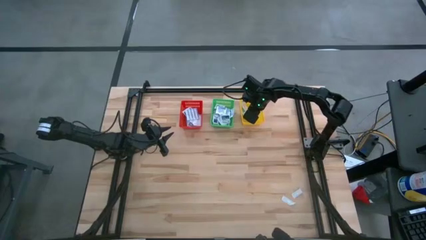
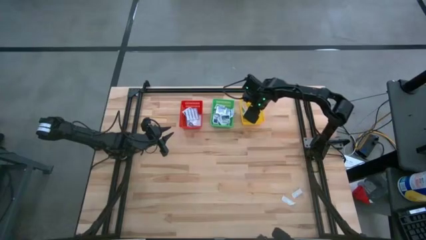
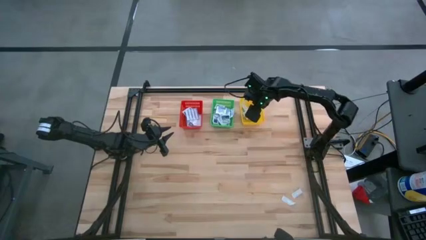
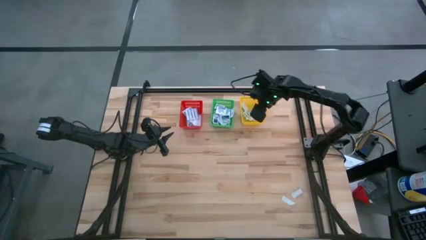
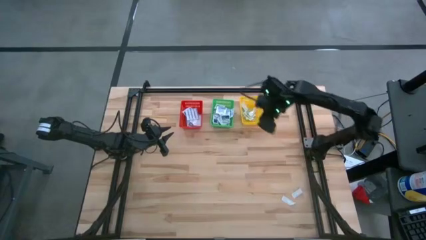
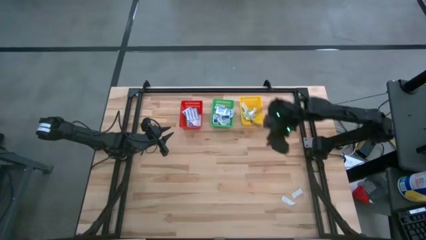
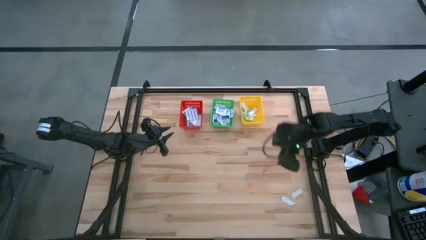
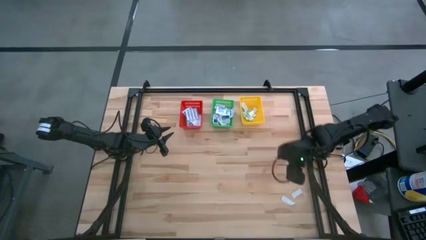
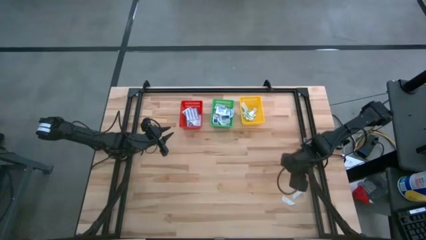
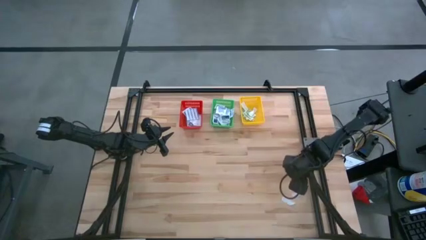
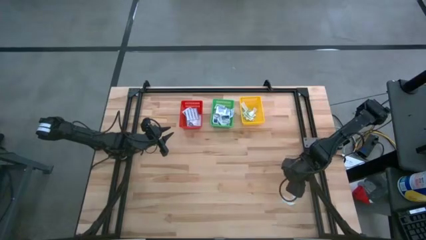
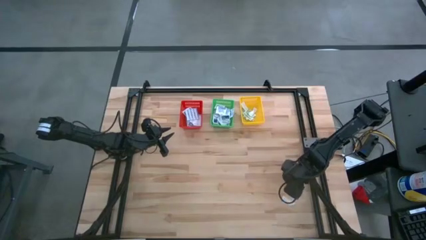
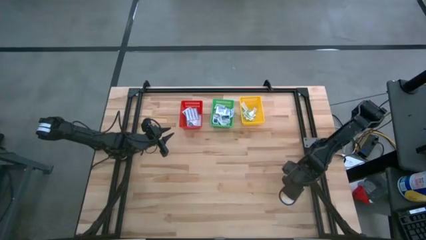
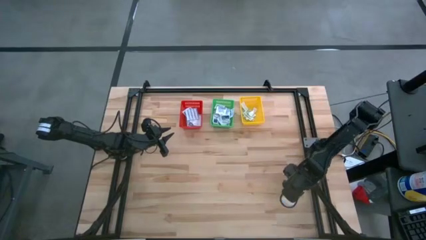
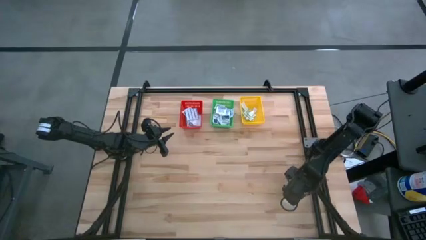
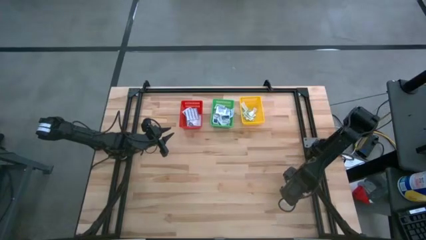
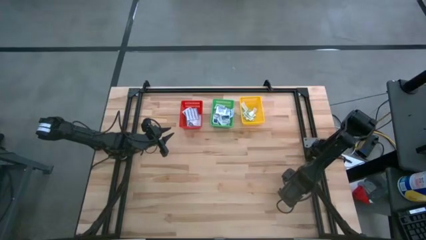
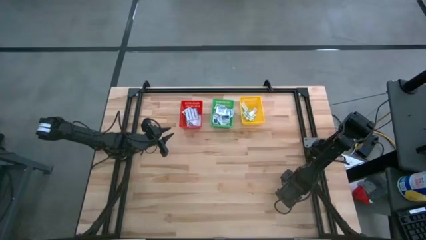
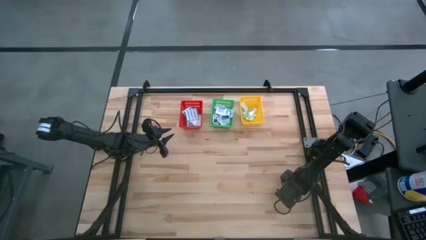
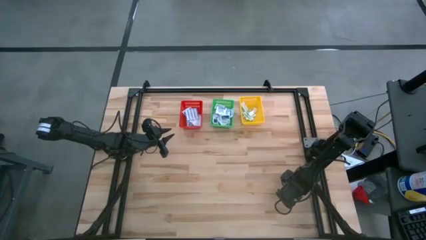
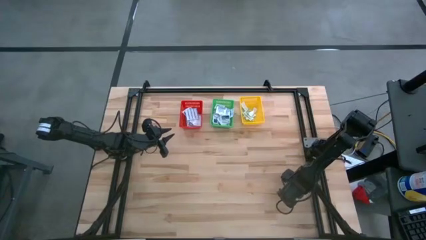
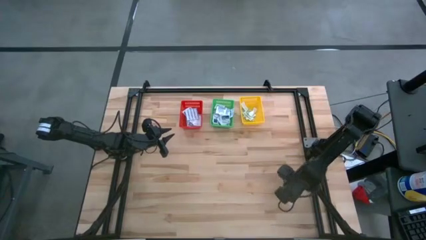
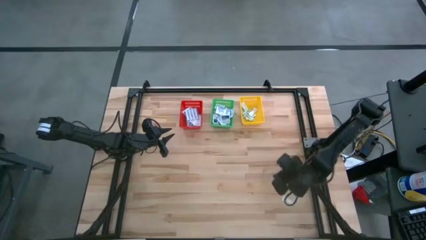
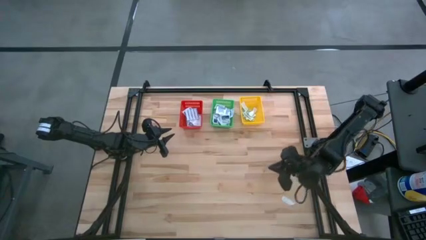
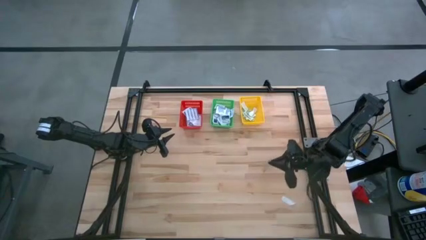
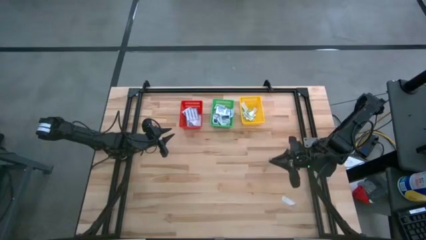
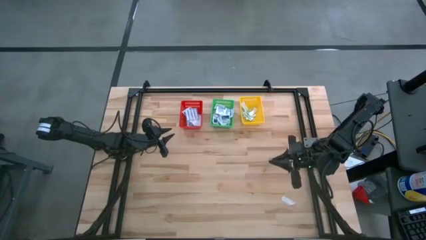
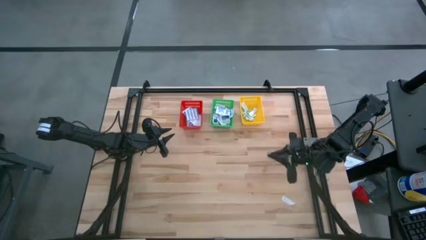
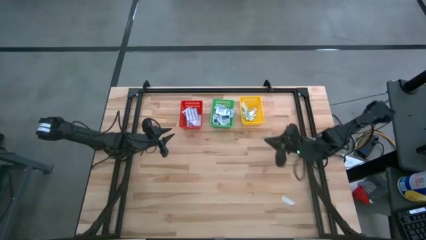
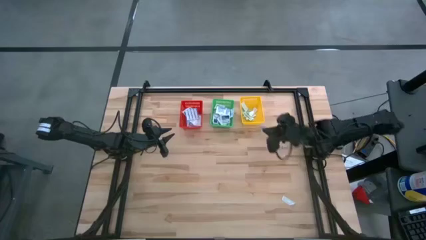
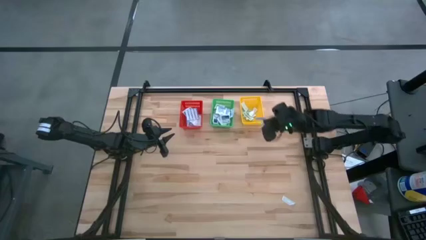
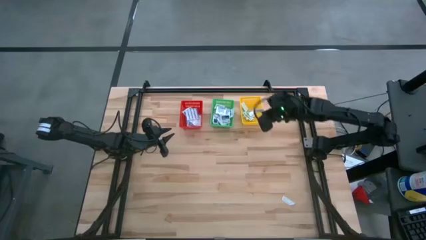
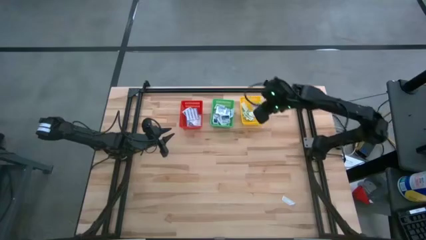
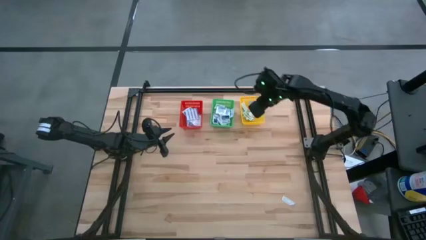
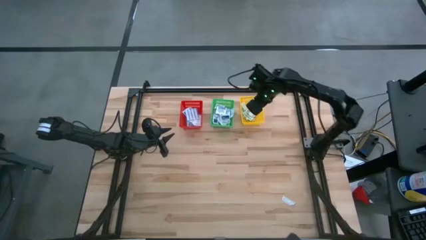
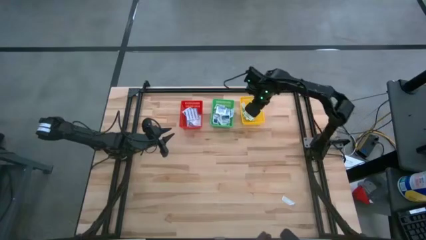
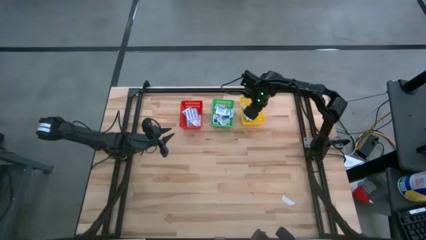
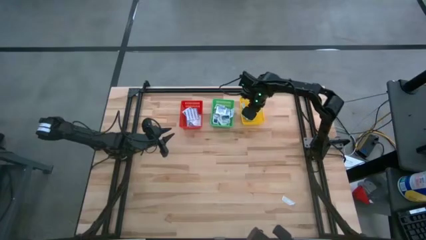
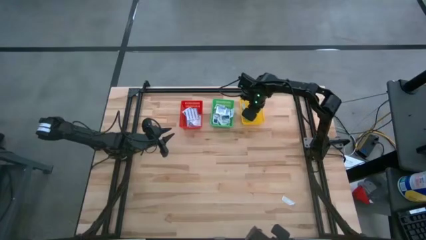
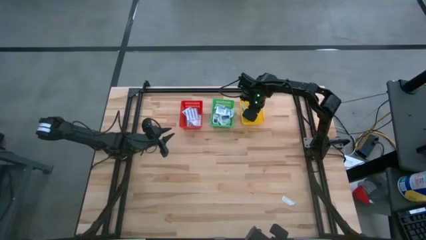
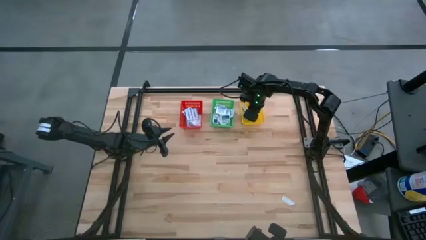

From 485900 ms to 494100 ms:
Task: Pick & Place First Aid Supplies
Put the green bandage into the yellow basket

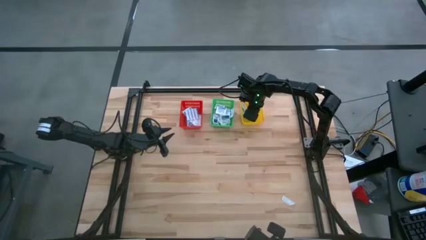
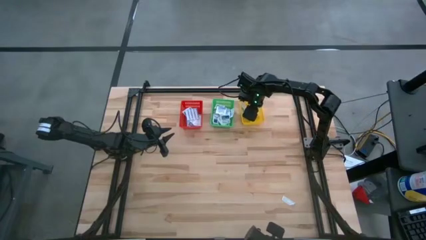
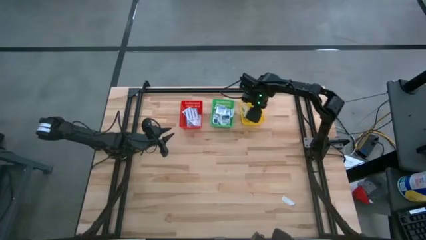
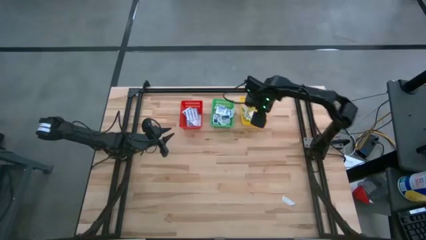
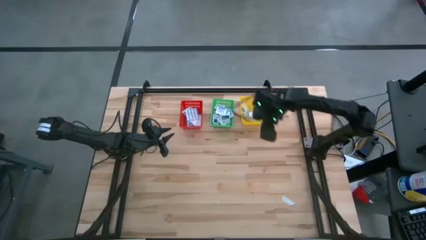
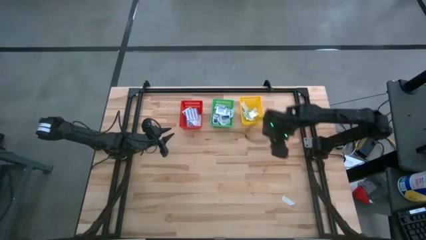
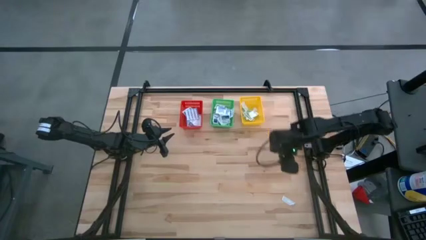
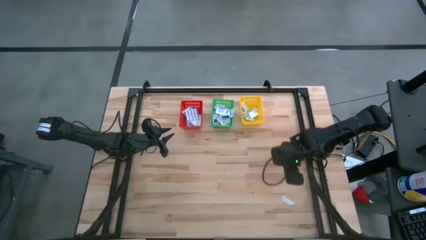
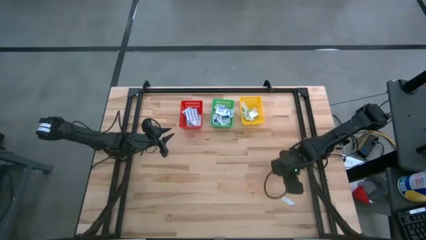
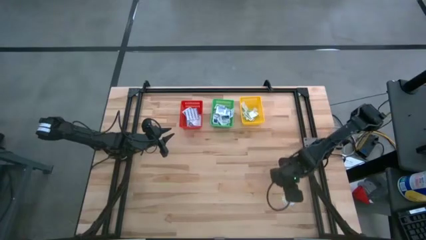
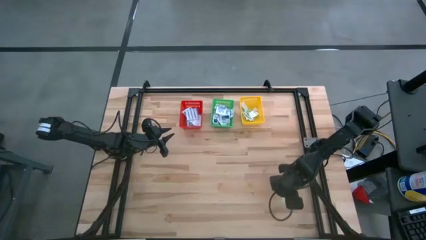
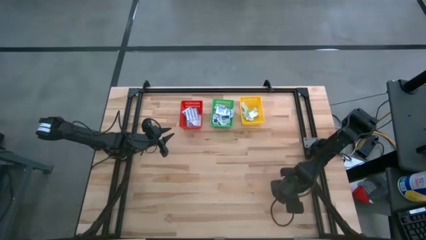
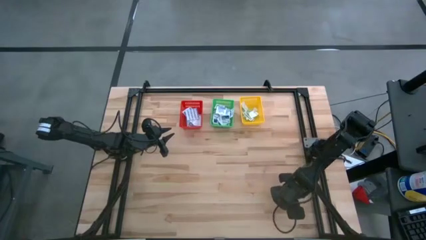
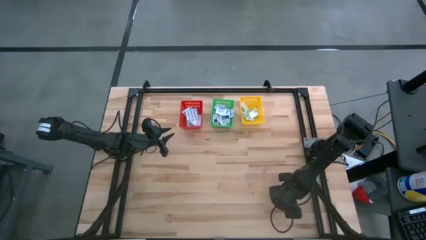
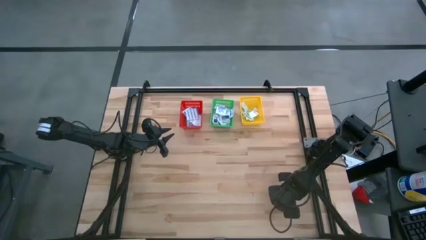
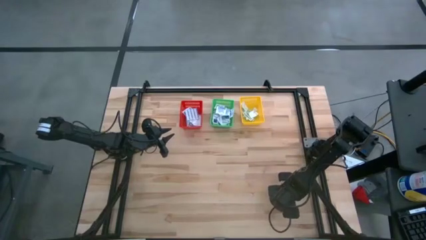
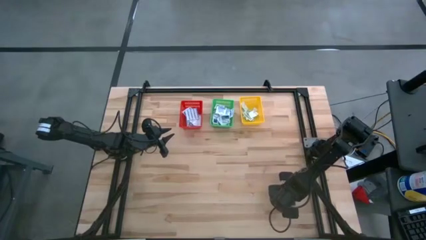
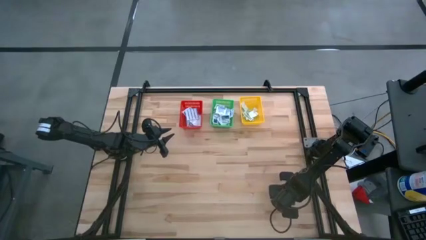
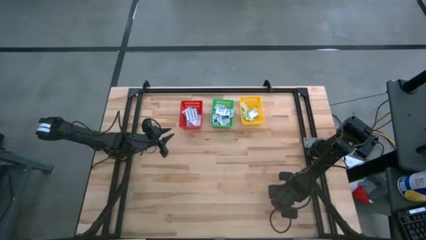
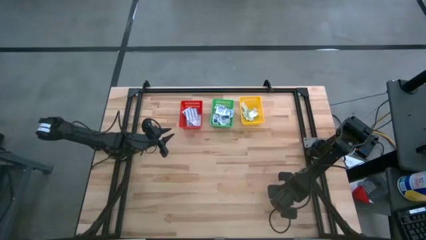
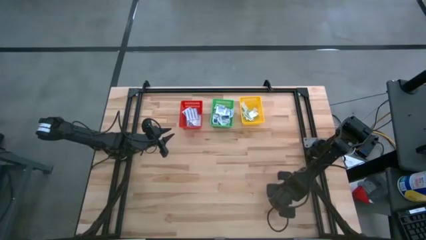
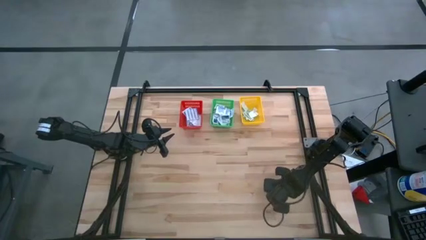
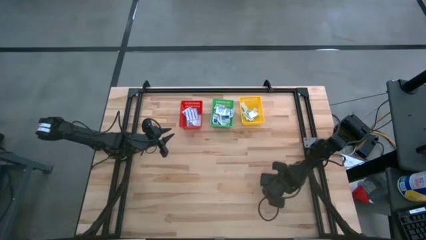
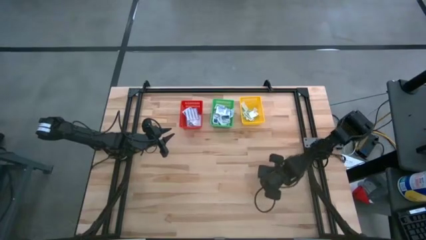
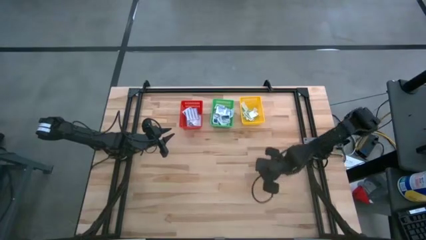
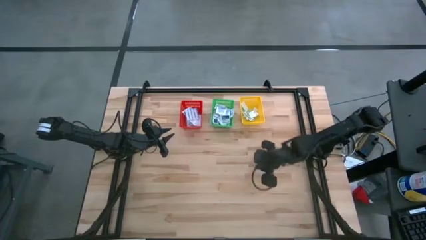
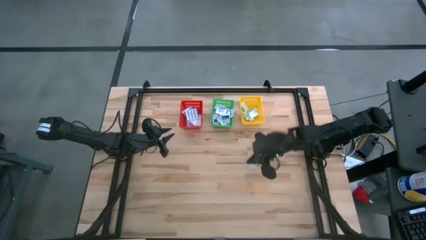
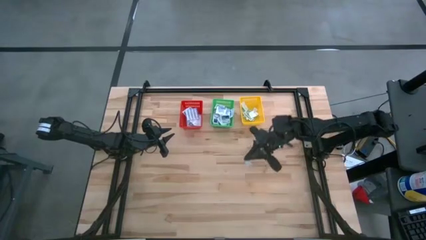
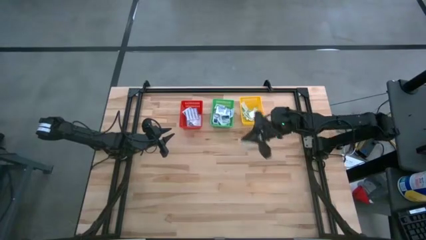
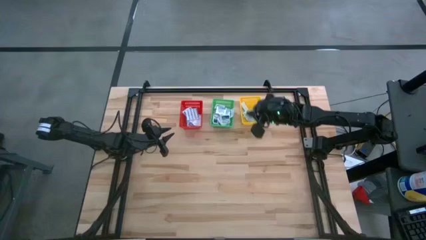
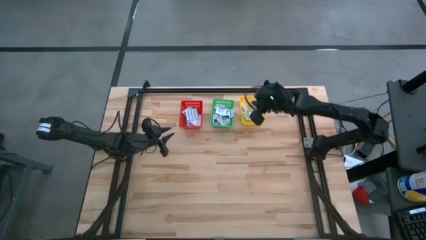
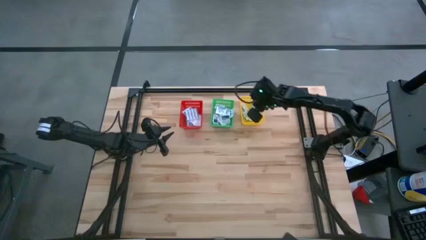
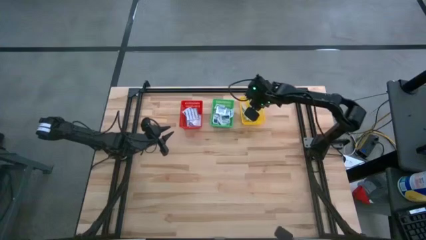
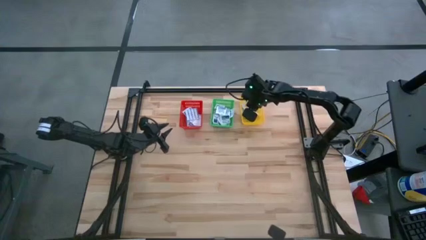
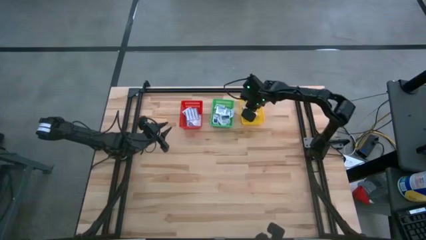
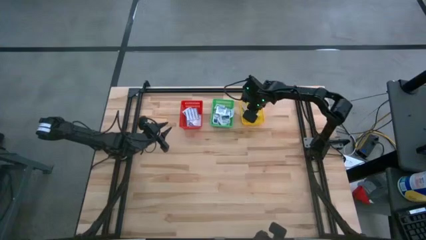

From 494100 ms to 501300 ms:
Put the green bandage into the yellow basket
